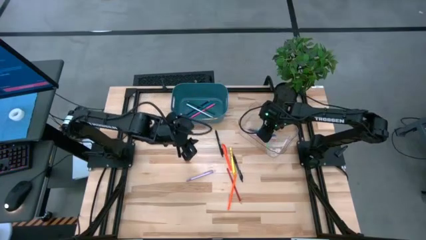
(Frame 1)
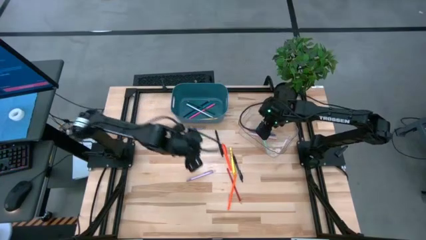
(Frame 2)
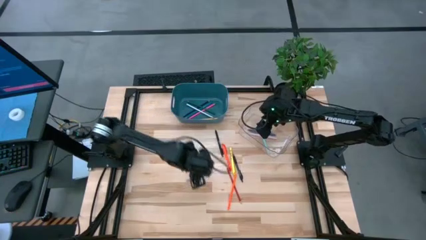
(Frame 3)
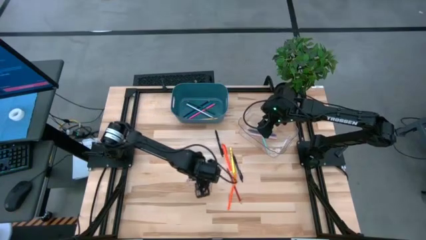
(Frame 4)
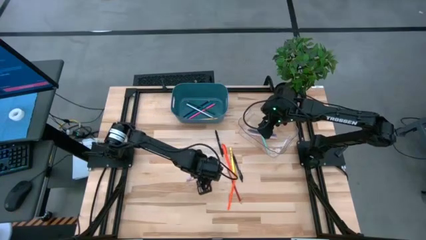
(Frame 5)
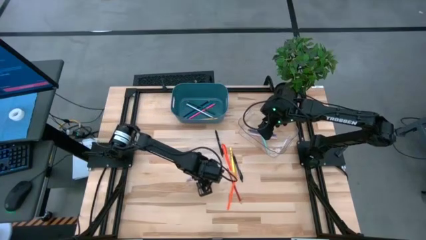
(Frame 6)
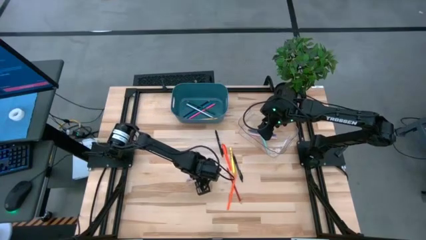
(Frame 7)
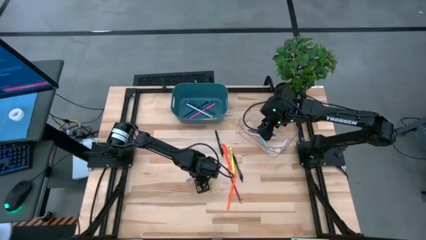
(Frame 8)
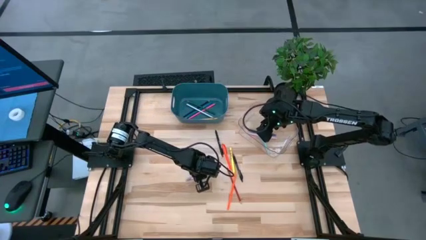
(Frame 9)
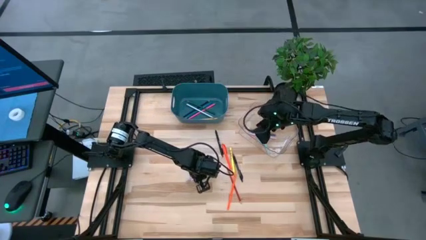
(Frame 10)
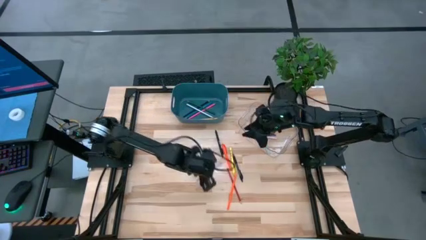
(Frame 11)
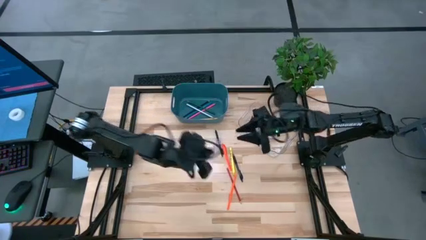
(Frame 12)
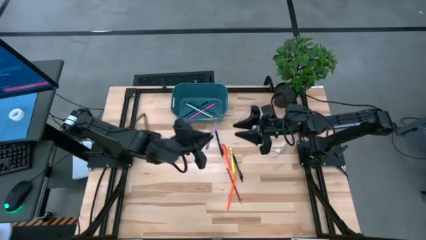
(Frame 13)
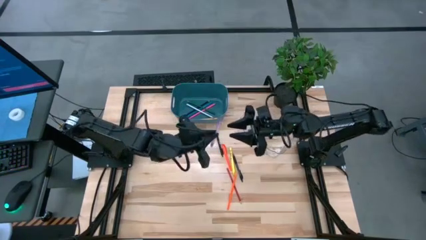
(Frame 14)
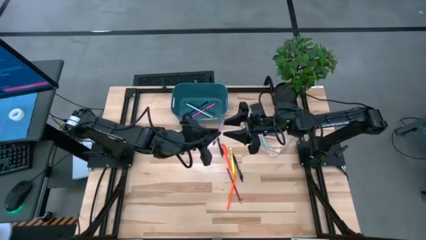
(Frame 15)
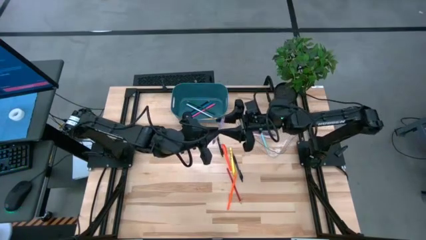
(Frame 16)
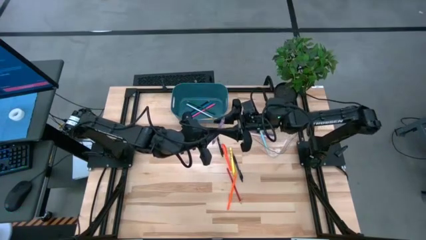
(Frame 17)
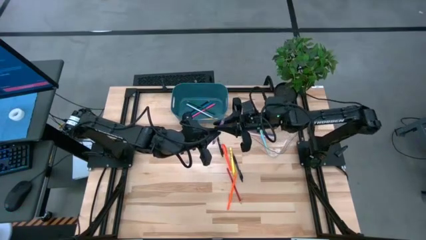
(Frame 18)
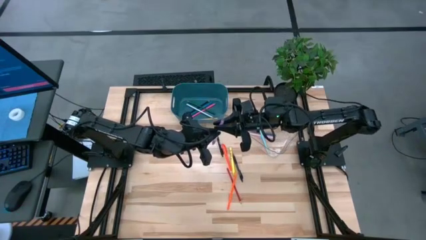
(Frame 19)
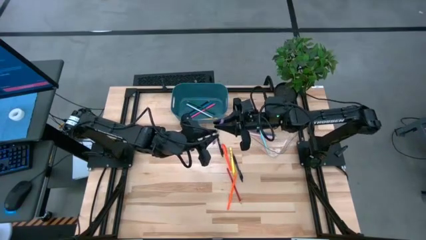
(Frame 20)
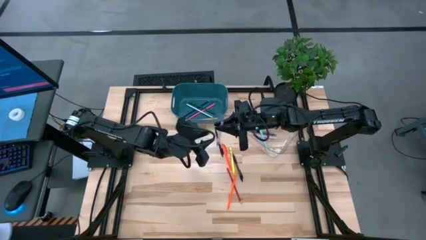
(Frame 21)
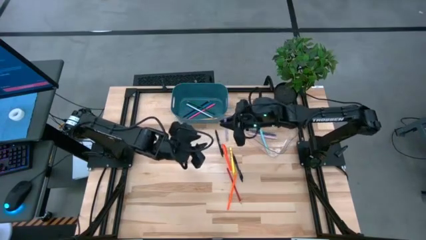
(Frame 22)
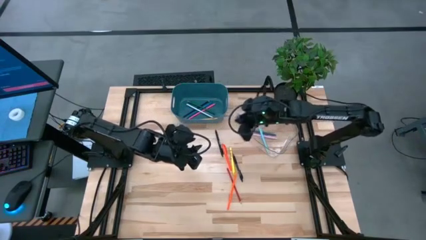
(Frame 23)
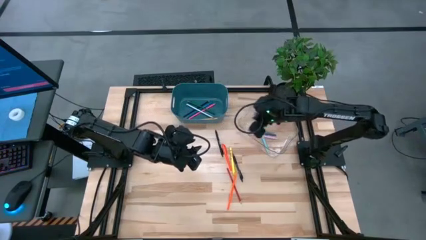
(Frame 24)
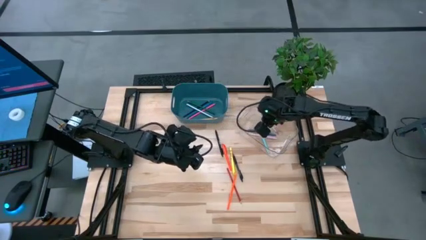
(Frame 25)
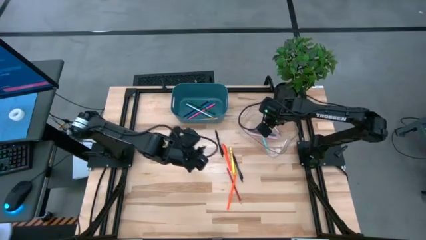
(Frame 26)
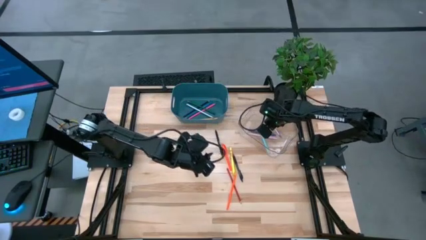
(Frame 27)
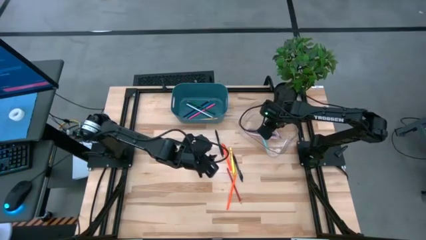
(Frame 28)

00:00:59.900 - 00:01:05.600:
Task: Sort pens & pencils
Put the purple pen into the transparent bin

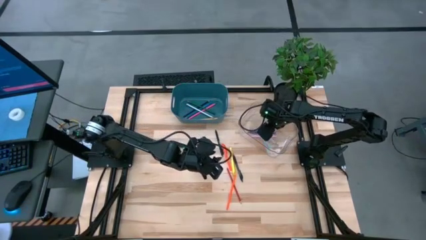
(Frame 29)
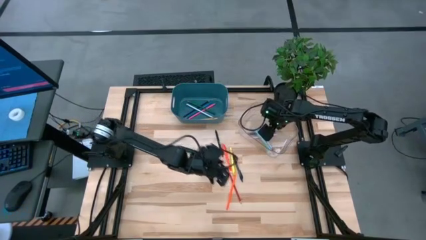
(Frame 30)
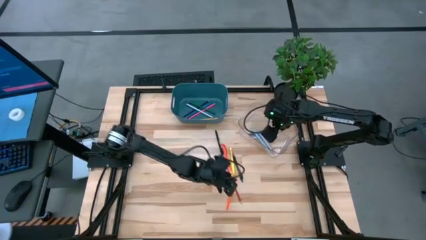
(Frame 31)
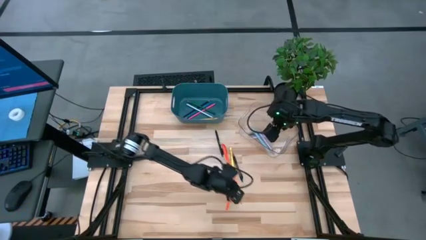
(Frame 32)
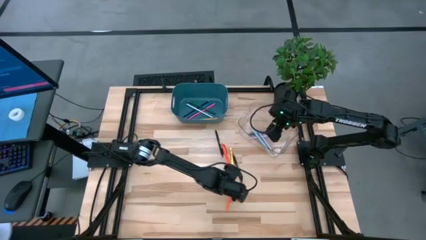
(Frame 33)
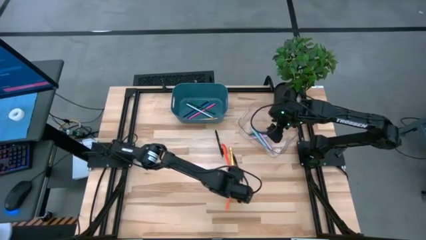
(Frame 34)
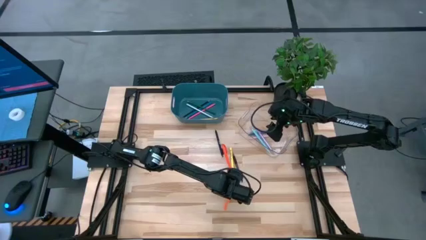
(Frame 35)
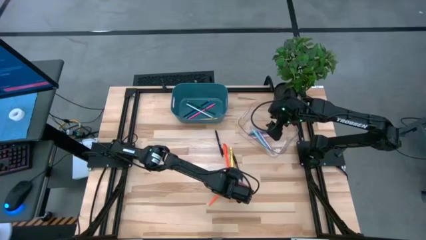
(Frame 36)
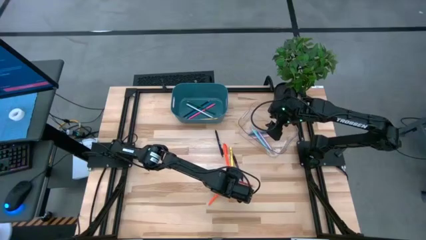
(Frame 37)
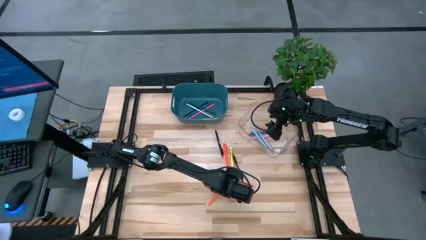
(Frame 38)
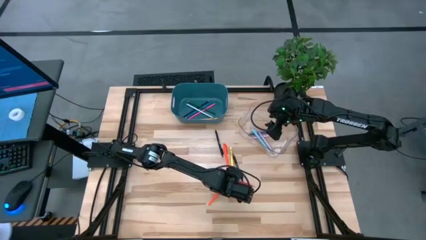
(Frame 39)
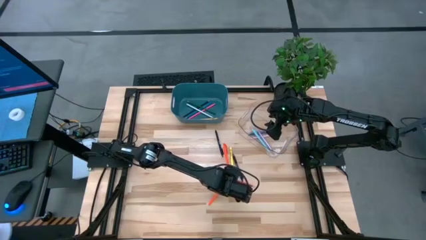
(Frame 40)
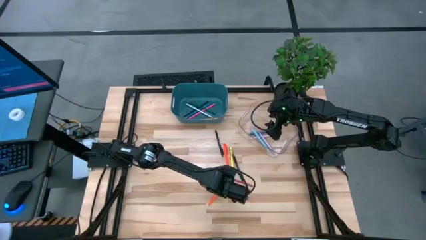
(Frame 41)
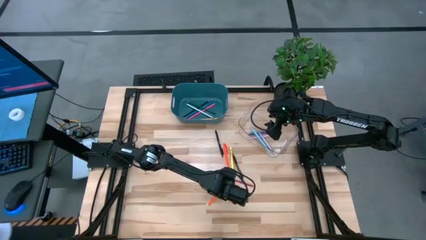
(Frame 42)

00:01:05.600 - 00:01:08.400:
Put the orange pencil into the blue bin

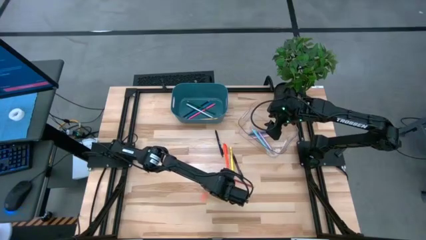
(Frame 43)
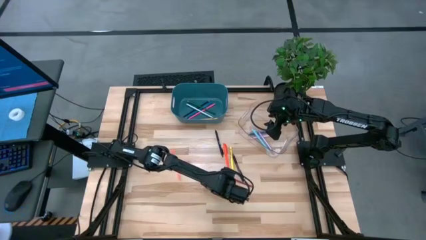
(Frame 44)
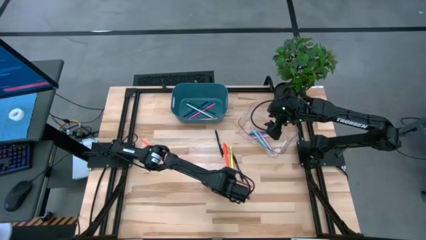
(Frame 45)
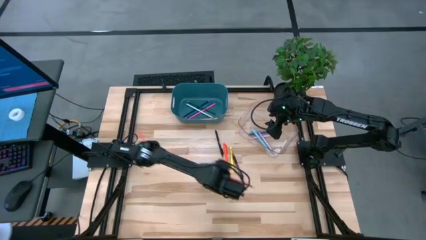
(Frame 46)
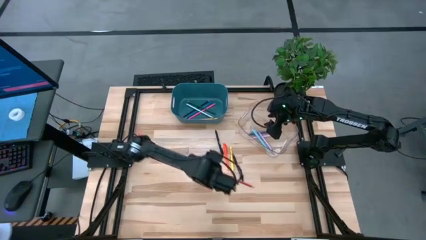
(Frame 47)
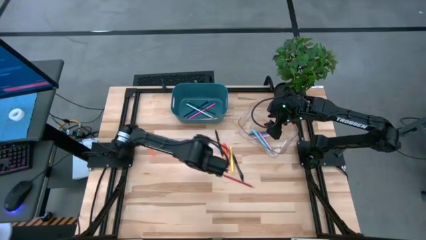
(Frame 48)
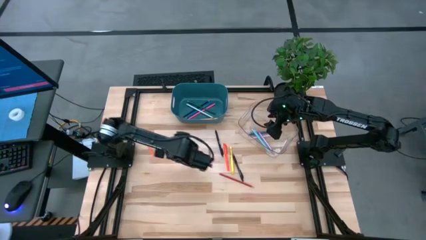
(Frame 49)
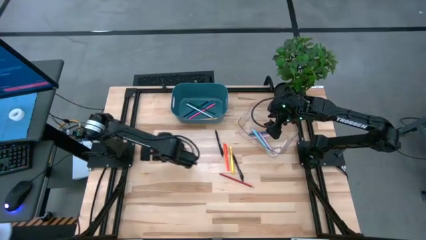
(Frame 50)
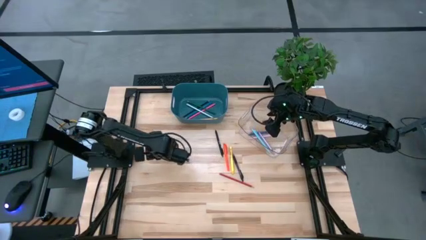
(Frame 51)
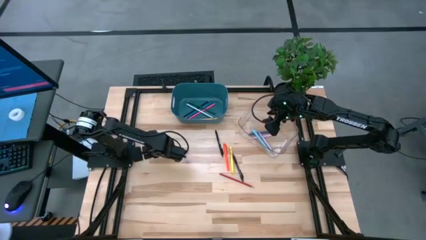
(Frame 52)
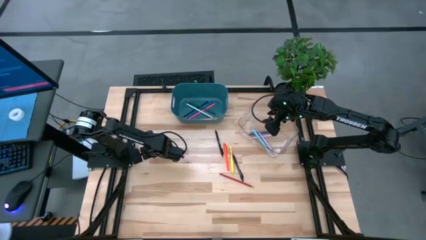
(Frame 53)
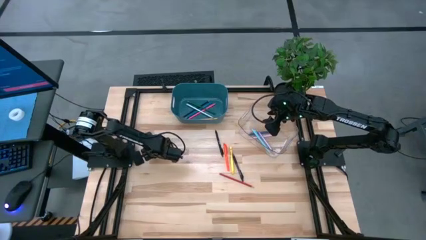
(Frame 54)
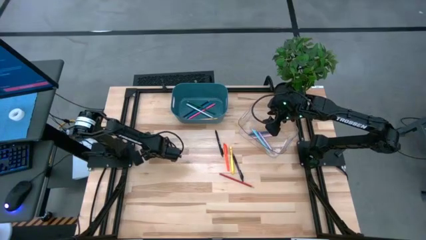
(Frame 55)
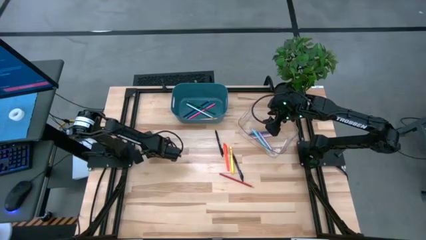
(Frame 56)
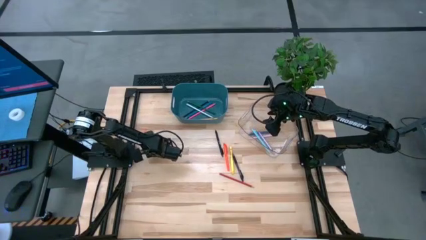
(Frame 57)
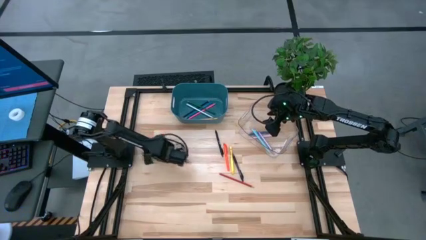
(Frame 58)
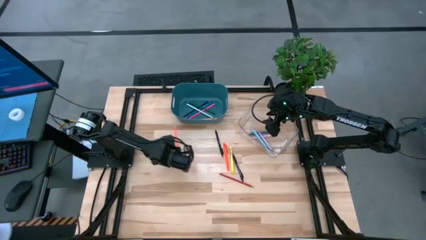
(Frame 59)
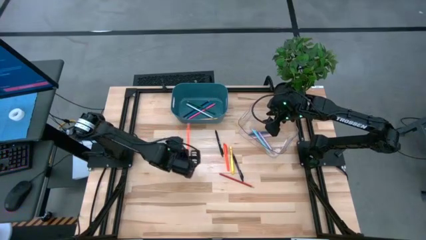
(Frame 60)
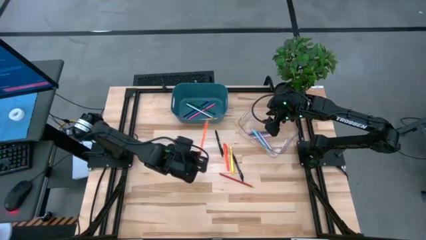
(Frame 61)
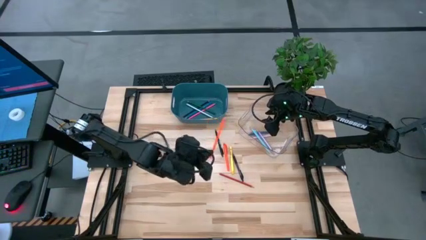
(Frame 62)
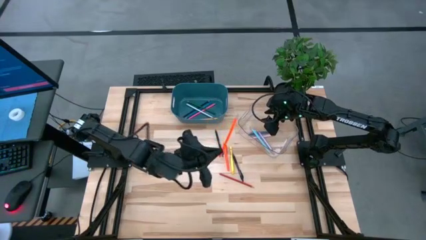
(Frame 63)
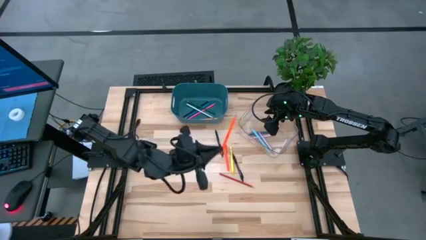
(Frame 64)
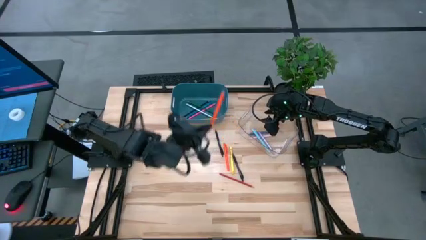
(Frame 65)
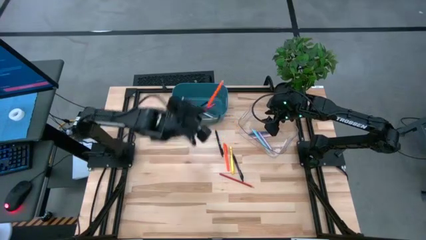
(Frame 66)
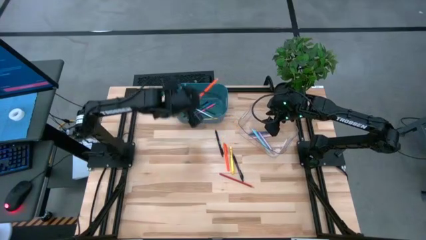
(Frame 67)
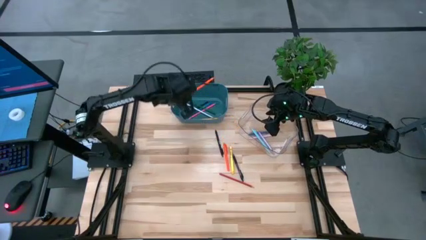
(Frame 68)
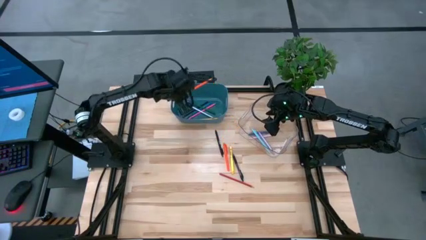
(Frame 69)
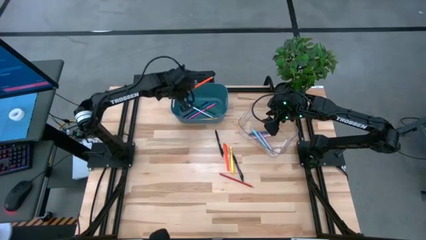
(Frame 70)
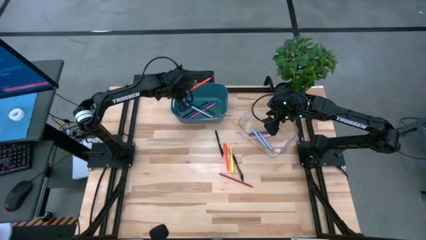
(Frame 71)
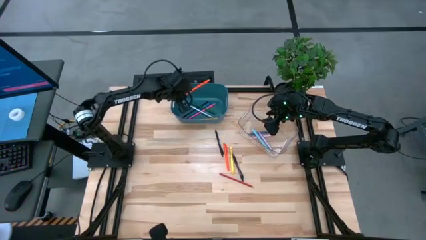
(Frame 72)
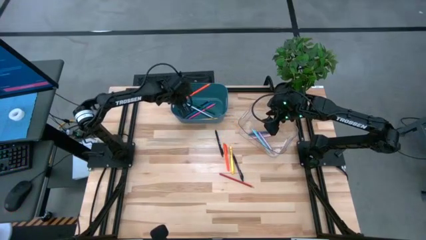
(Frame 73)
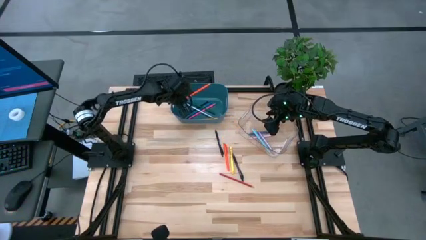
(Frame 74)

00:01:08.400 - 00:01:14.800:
Put the orange pencil into the blue bin

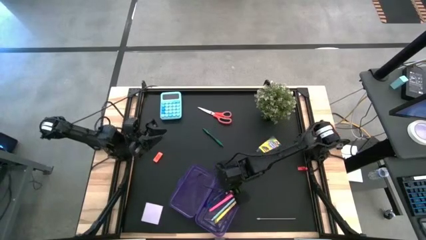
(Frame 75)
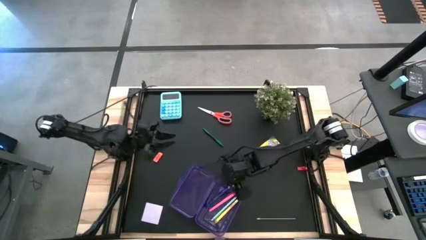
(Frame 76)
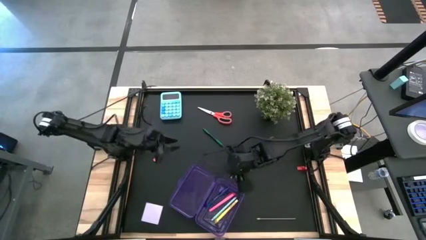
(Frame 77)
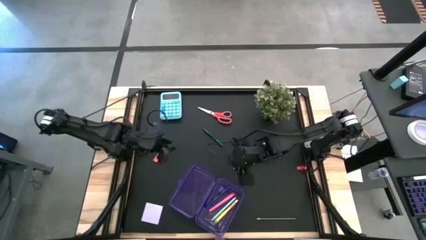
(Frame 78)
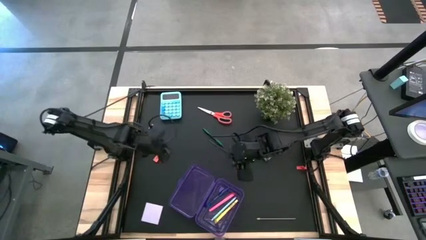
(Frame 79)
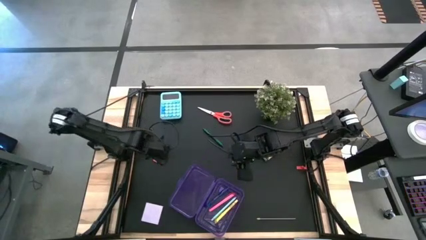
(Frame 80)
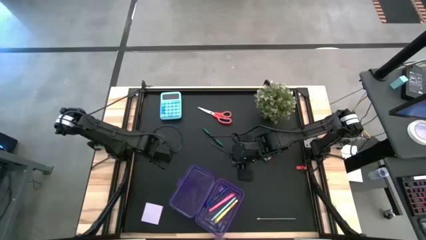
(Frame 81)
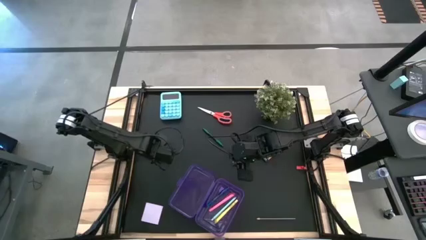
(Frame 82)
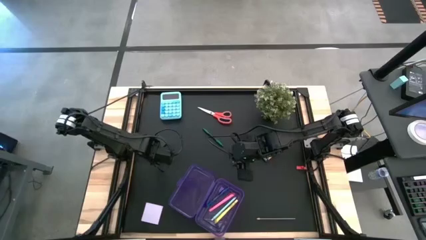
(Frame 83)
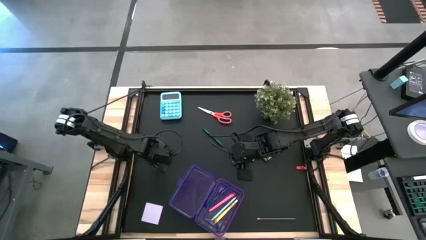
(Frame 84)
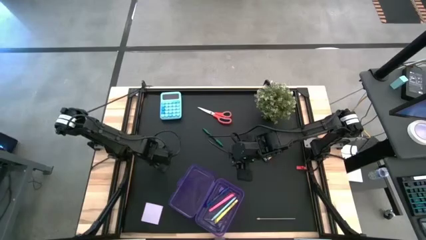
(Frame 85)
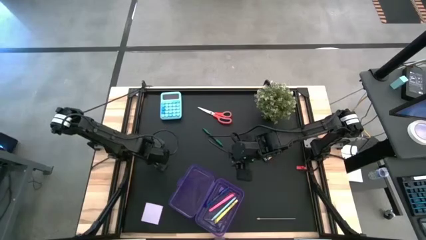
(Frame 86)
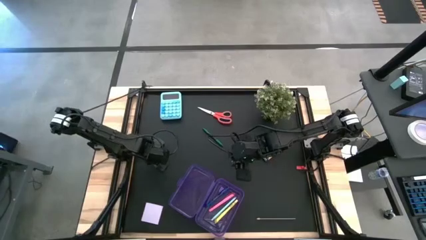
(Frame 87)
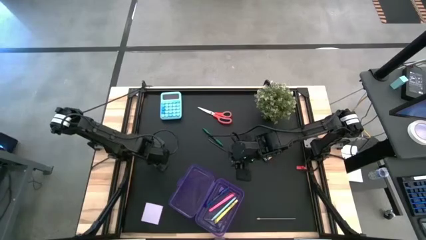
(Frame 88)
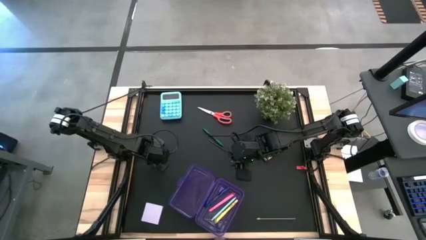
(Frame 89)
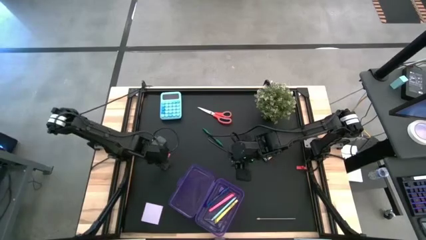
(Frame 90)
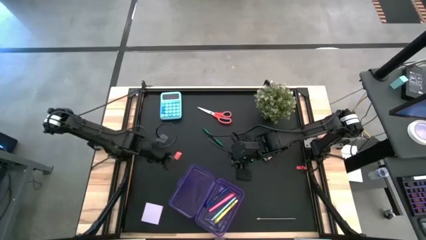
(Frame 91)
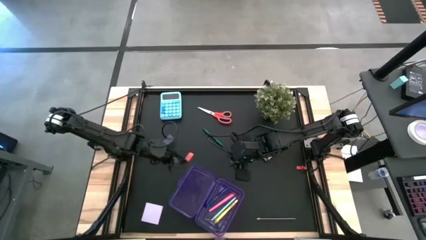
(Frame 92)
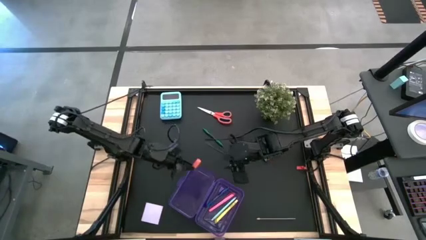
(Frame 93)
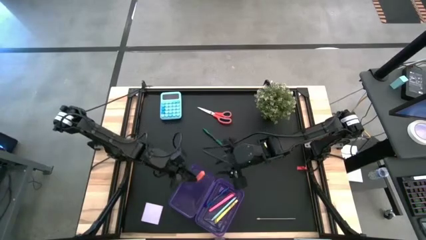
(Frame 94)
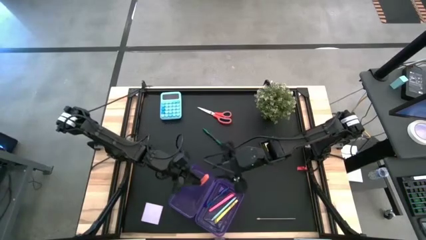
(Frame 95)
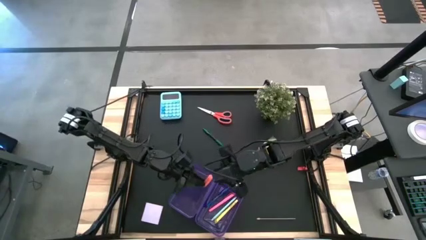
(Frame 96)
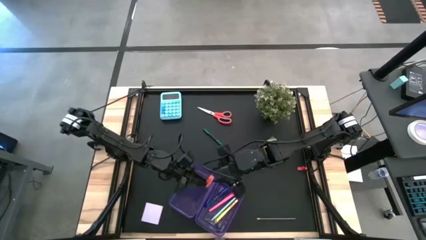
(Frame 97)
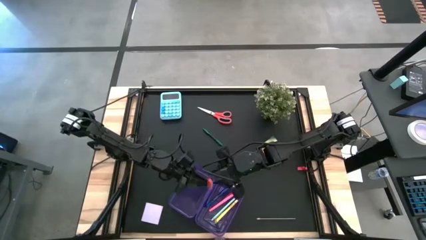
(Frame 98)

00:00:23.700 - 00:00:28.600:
Task: Pack school essentials
Put the orange eraser into the purple supply box
